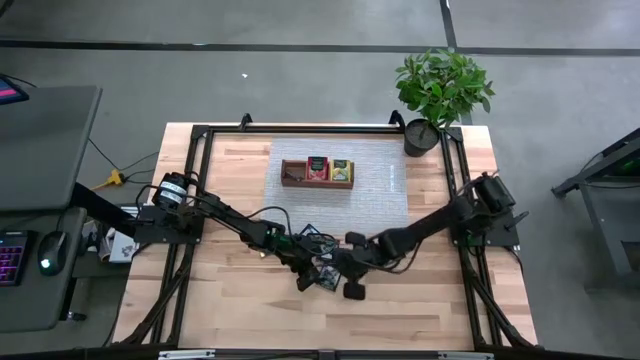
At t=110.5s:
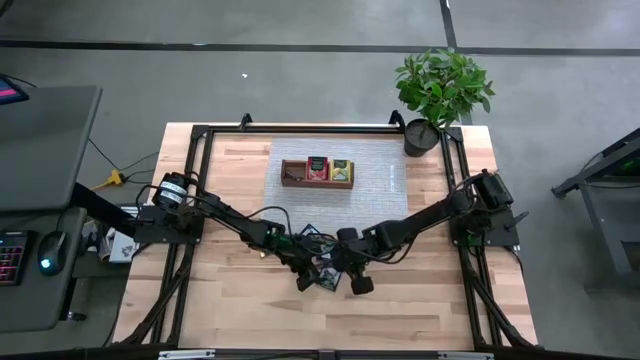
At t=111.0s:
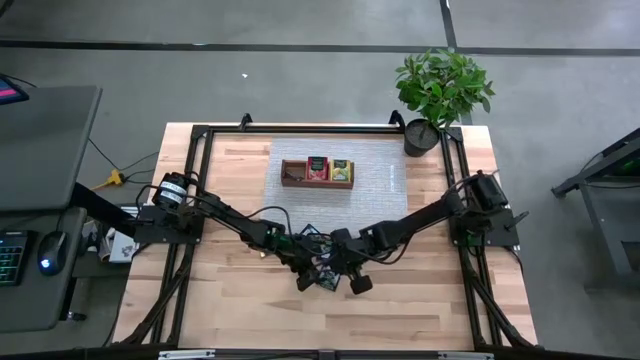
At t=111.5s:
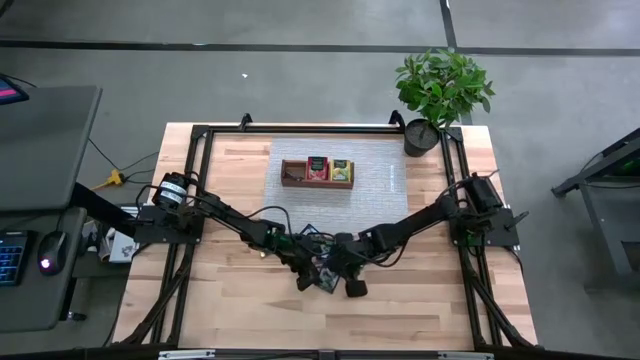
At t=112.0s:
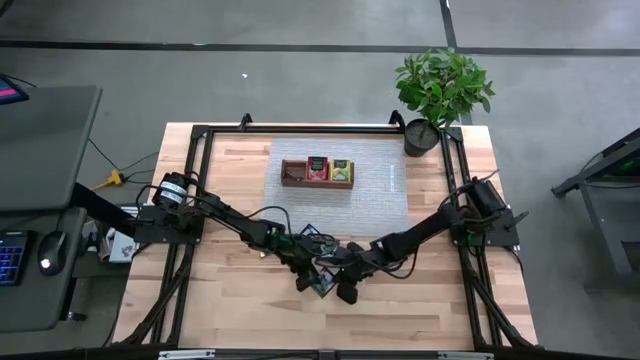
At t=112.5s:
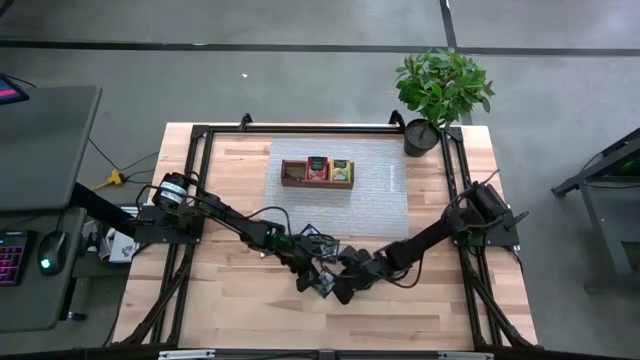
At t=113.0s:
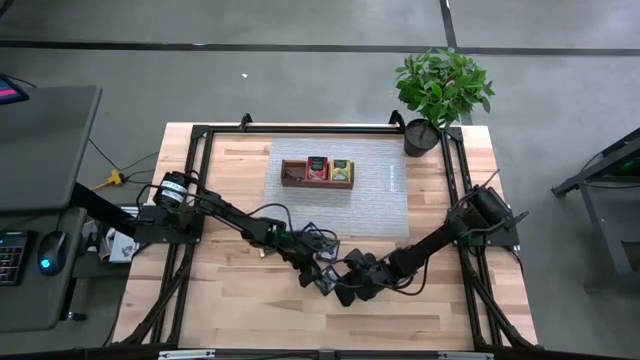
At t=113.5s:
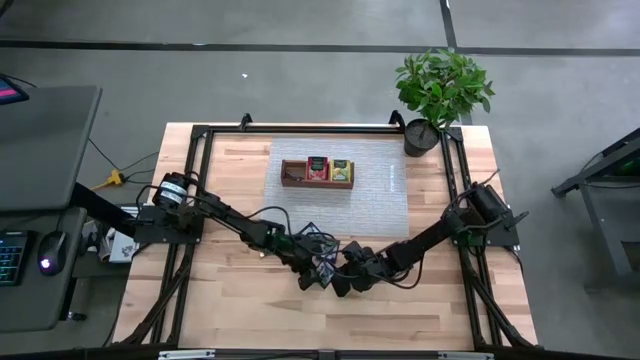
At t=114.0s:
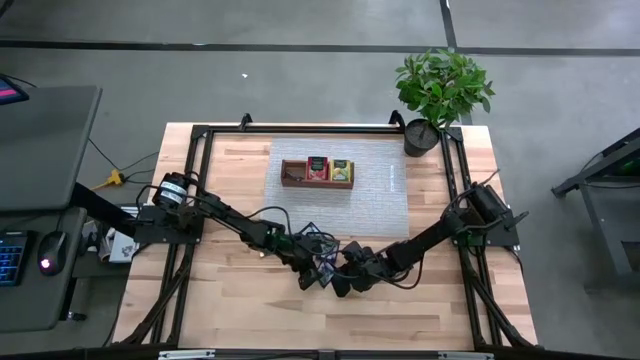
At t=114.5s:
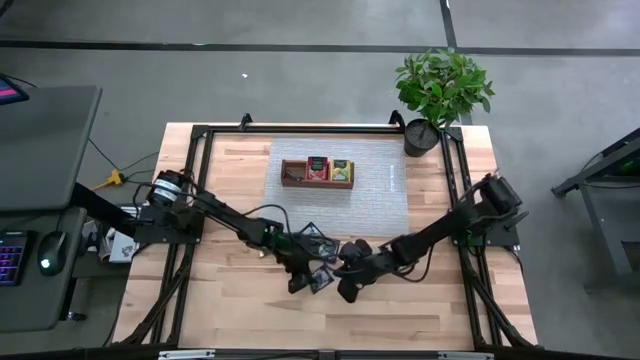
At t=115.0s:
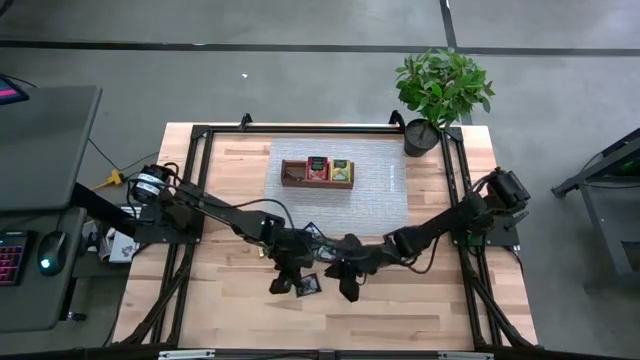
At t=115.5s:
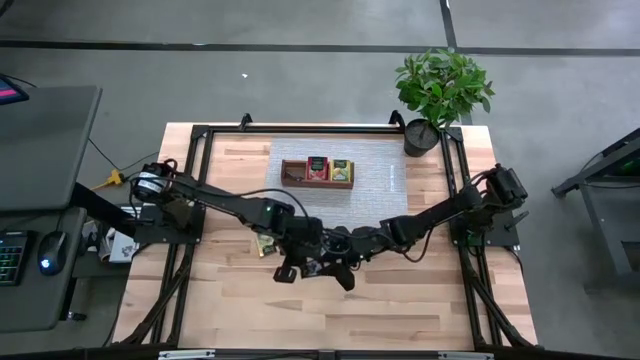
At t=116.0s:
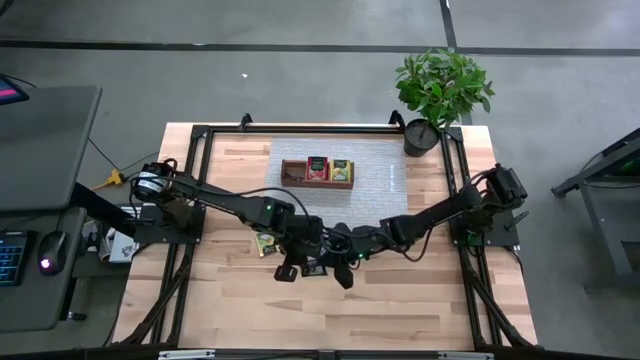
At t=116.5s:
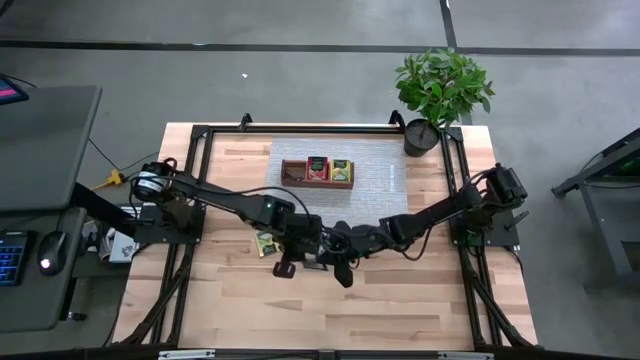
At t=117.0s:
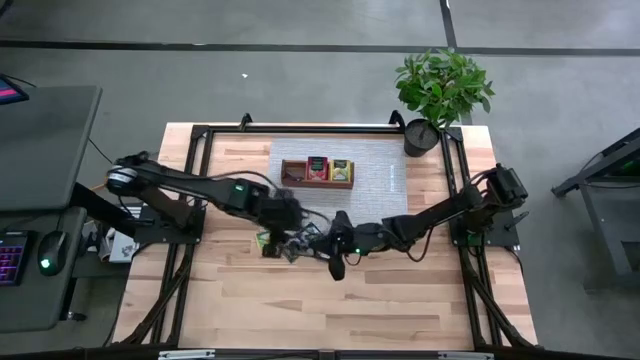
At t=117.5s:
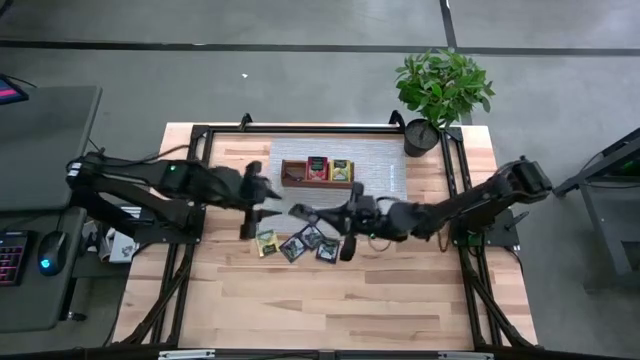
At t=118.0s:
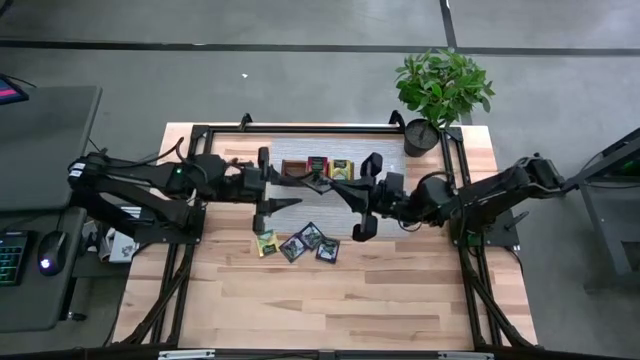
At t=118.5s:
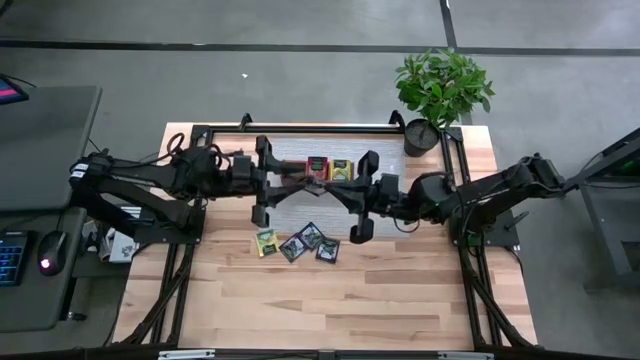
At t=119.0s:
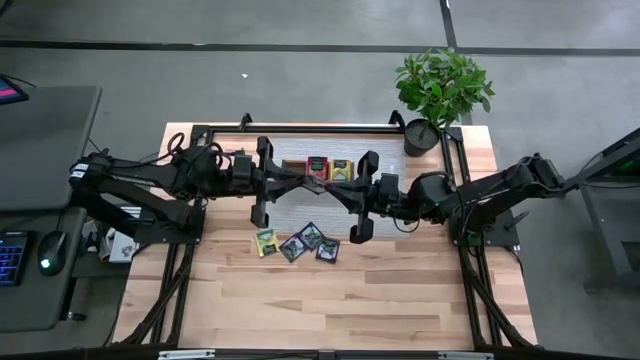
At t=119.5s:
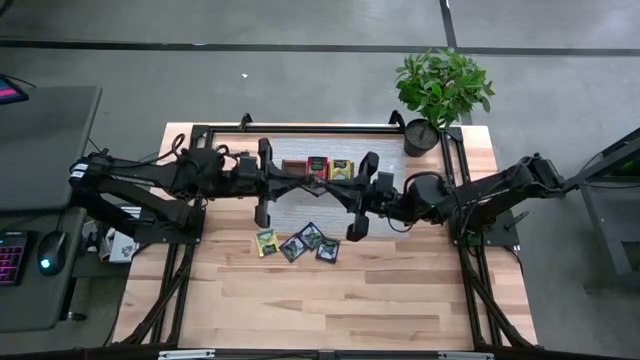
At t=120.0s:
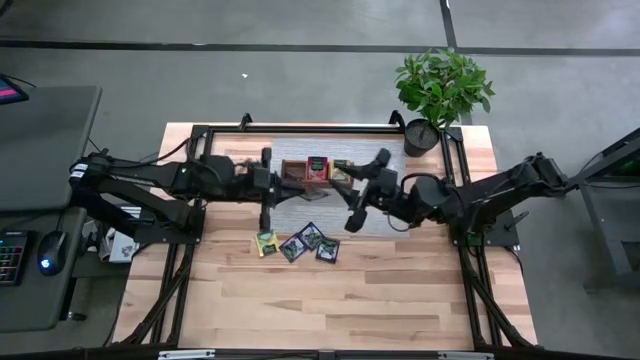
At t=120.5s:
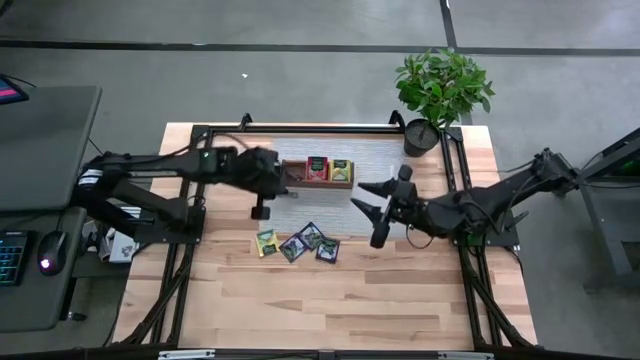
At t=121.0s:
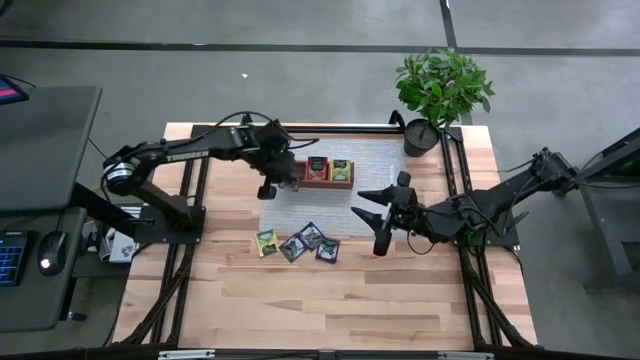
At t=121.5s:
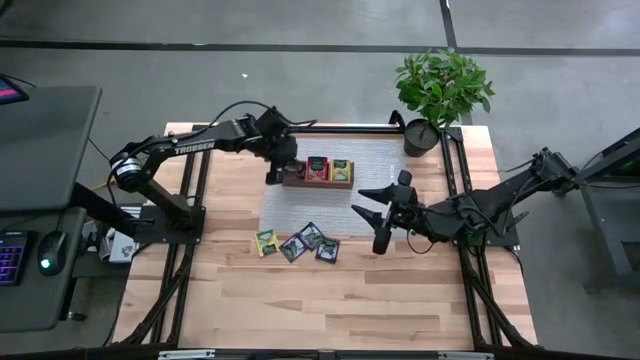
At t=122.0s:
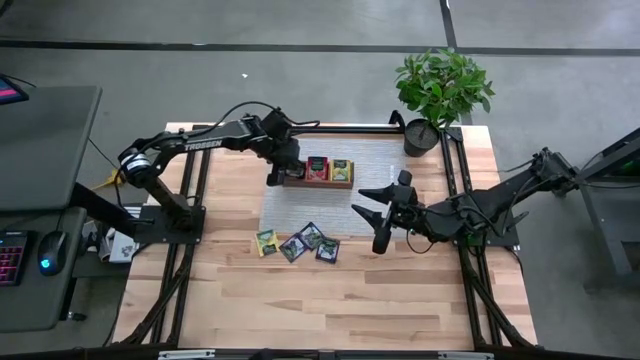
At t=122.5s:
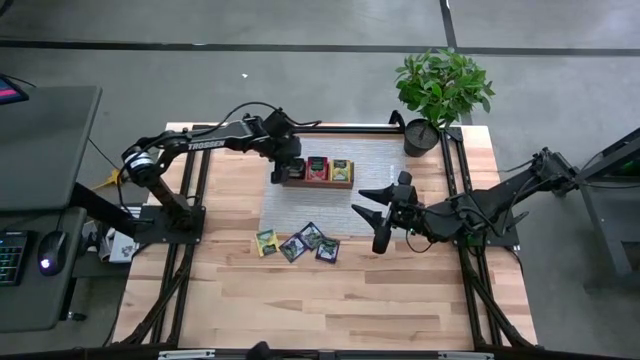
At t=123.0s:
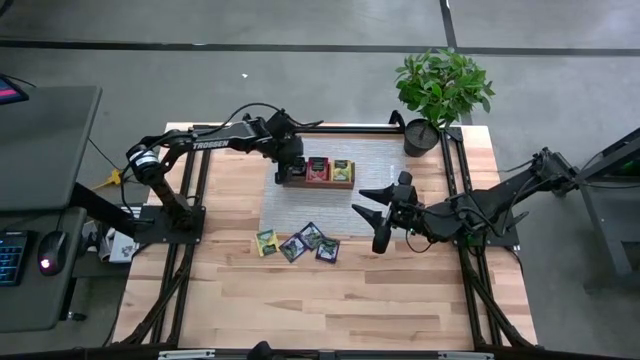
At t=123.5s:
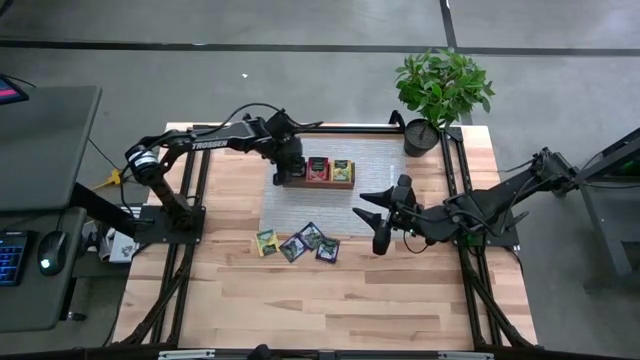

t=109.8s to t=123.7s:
Task: Pick & Place Tea
Put the purple tea bag into the left section of the wooden organizer

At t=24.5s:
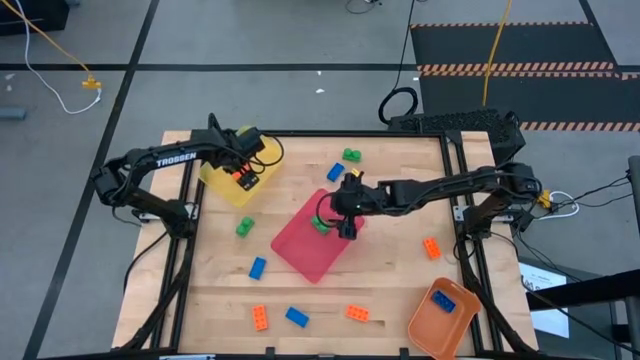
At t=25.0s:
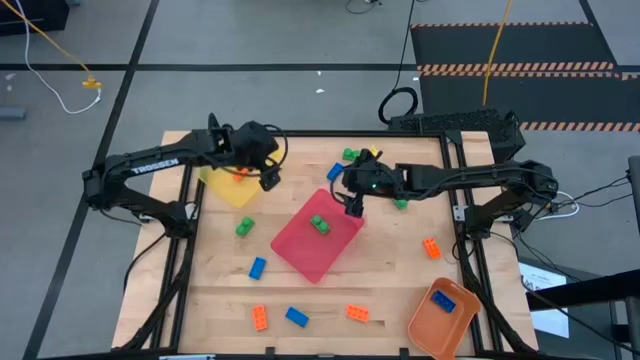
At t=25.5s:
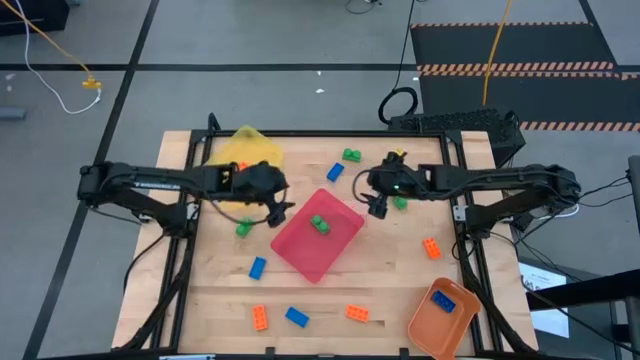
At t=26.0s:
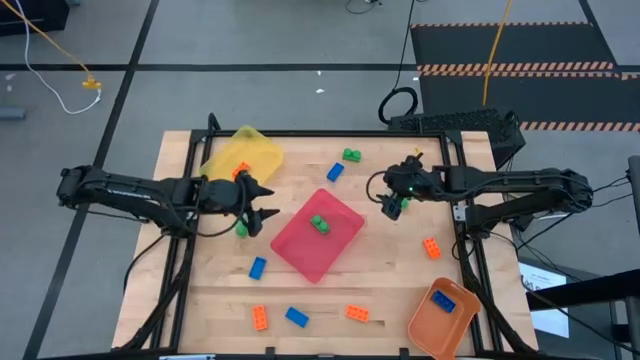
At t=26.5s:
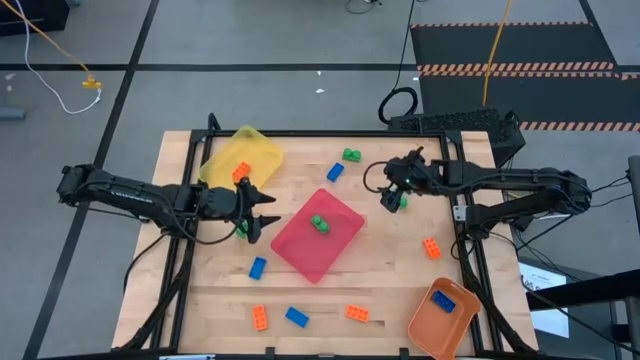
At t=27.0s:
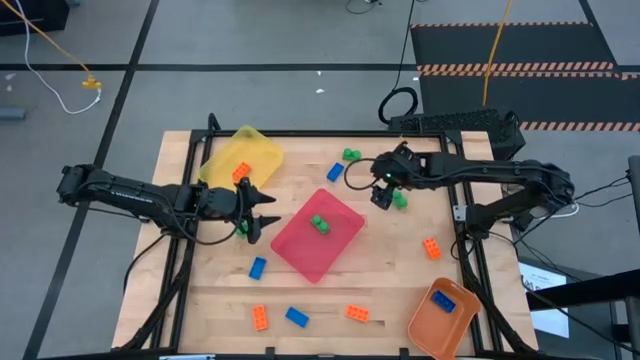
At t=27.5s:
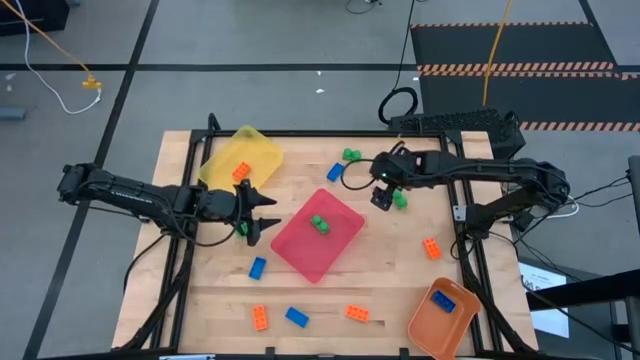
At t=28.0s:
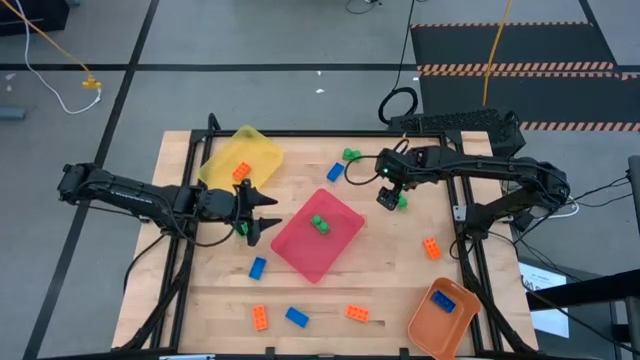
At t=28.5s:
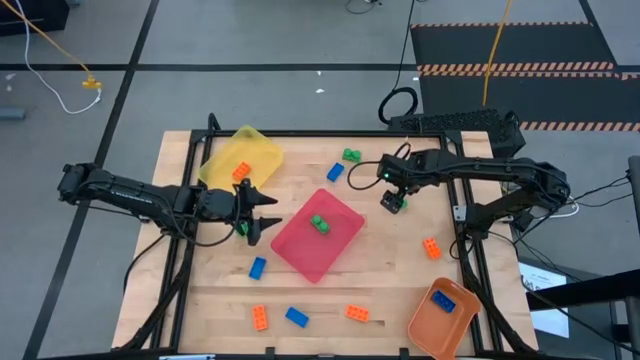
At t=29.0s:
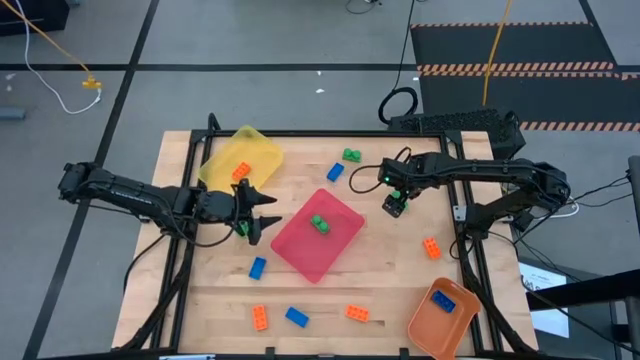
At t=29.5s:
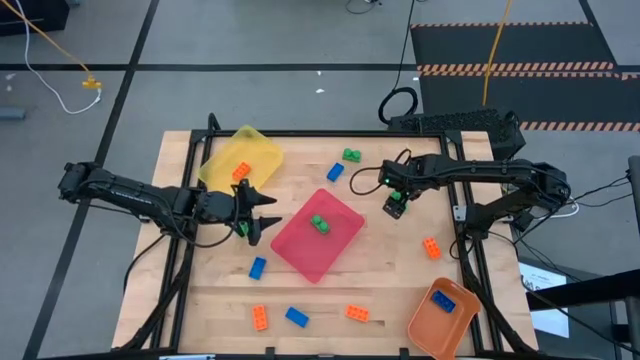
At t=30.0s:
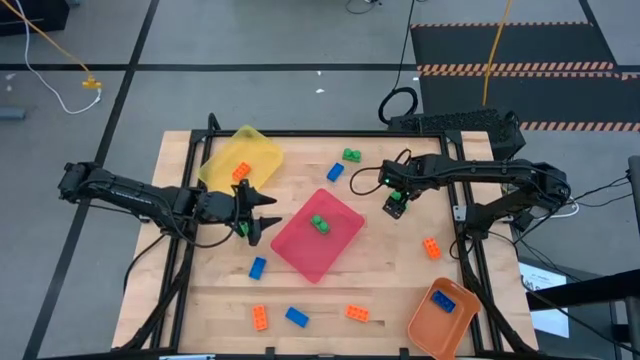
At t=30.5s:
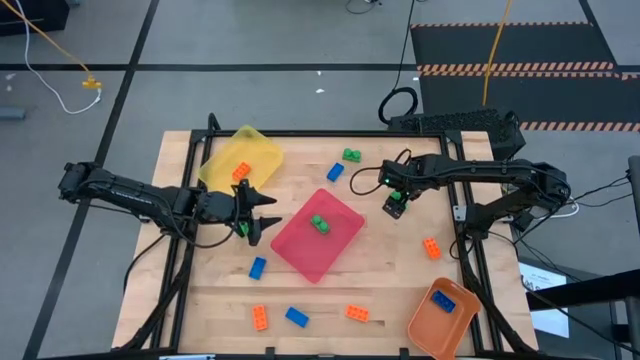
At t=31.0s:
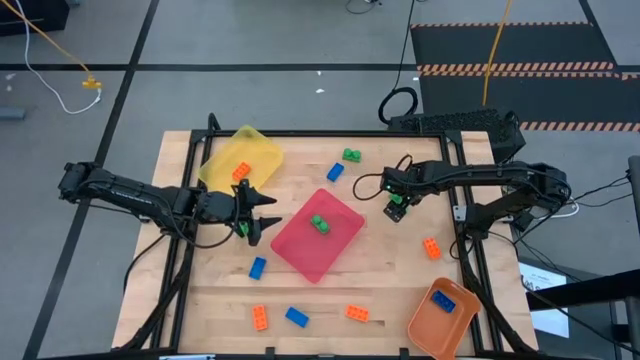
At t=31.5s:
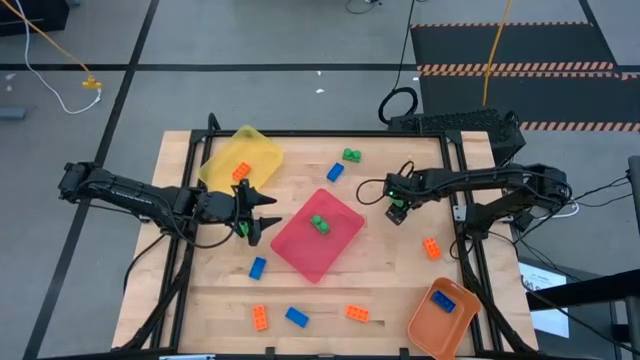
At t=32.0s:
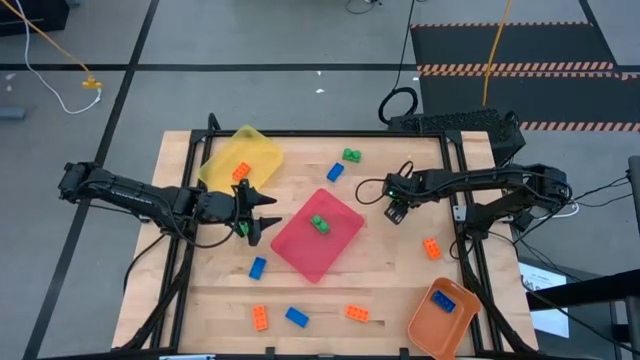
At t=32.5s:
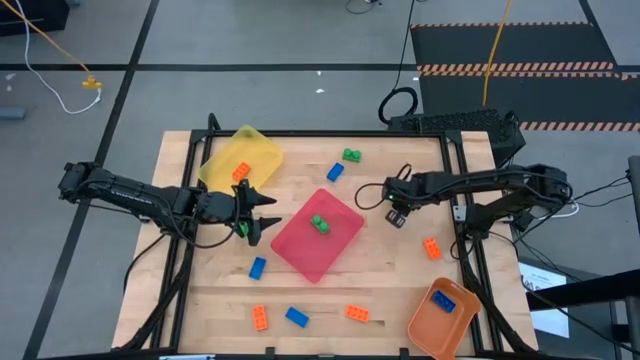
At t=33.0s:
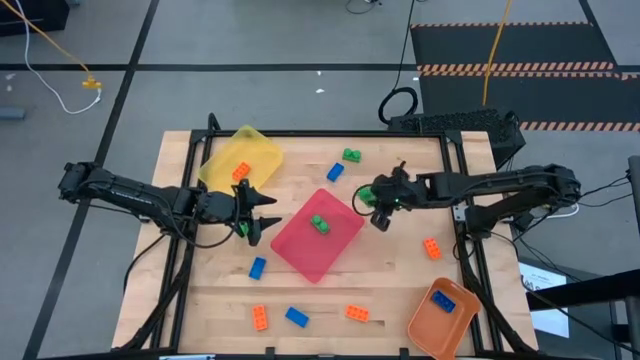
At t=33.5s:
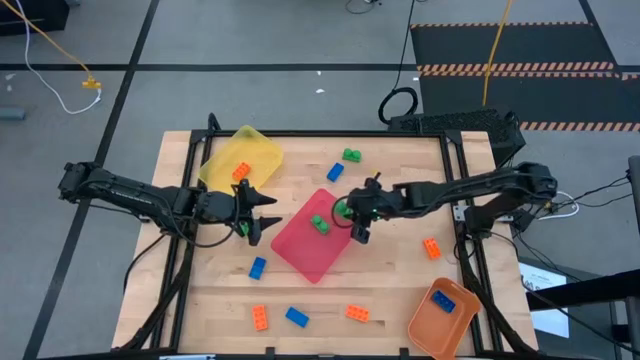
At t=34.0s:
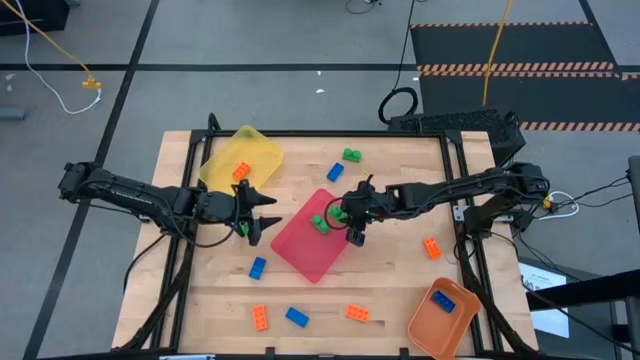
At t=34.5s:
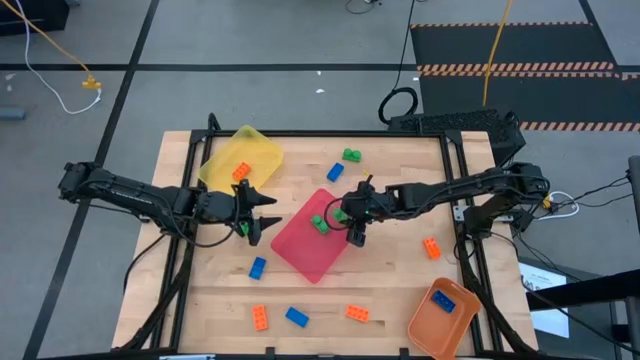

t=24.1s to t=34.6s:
Task: Sort & place blocks by color
Put the green game piece into the red bin
